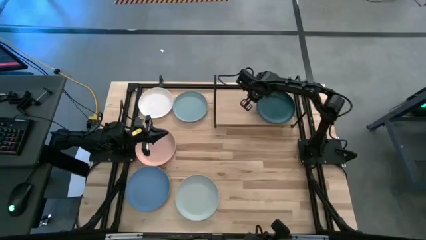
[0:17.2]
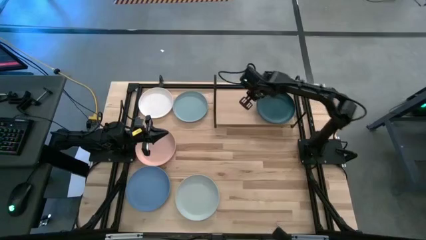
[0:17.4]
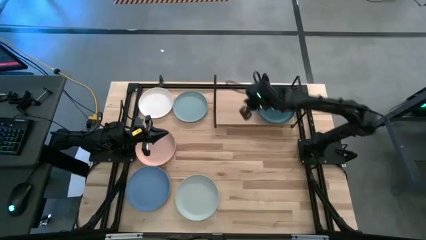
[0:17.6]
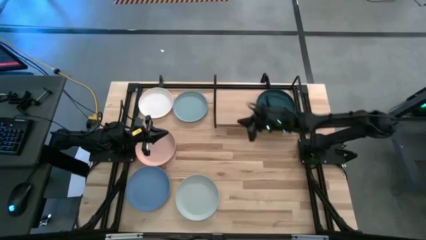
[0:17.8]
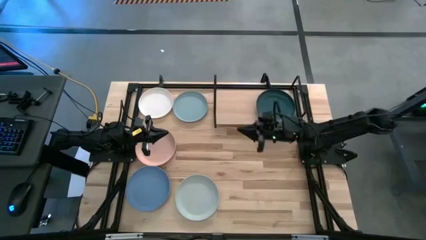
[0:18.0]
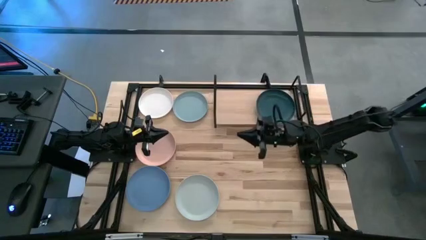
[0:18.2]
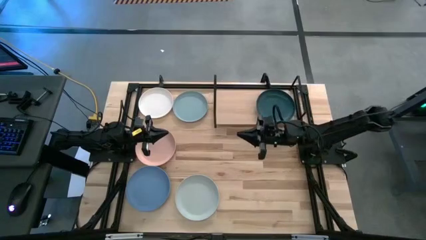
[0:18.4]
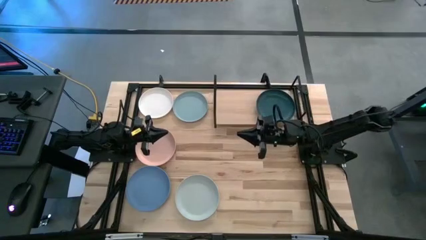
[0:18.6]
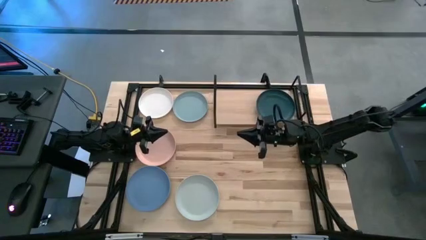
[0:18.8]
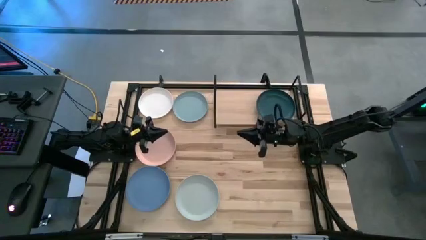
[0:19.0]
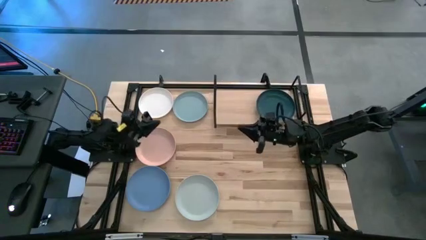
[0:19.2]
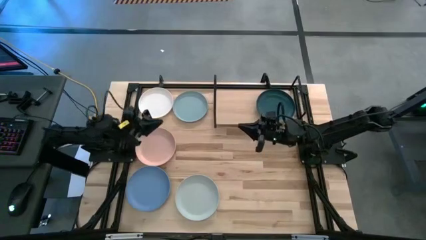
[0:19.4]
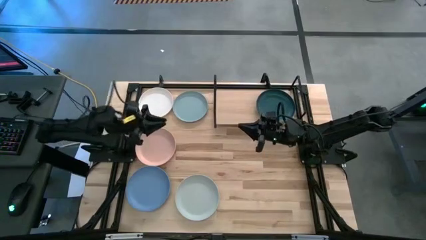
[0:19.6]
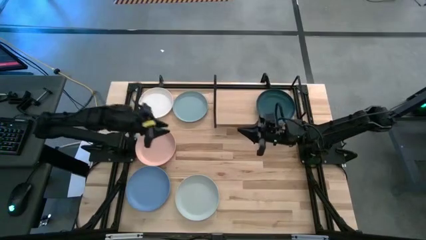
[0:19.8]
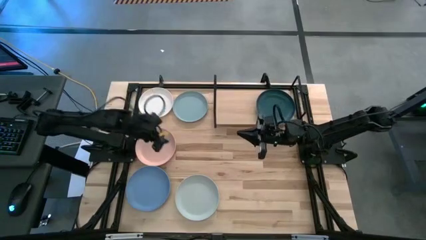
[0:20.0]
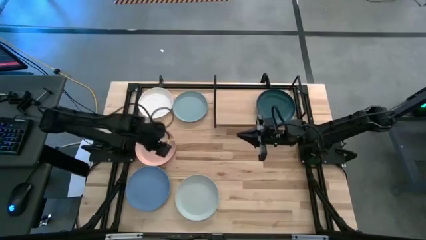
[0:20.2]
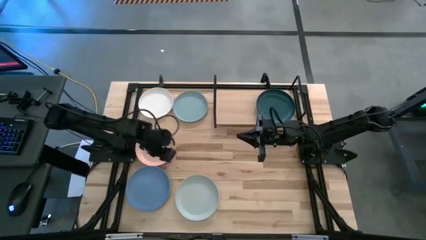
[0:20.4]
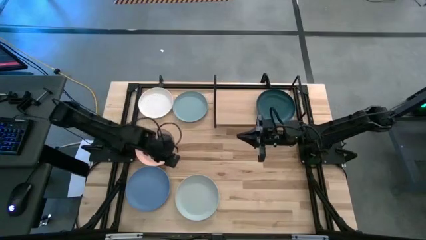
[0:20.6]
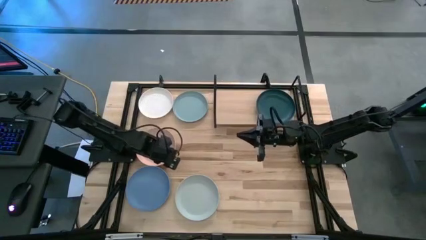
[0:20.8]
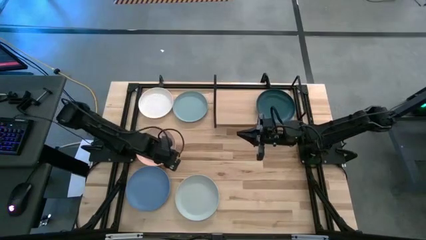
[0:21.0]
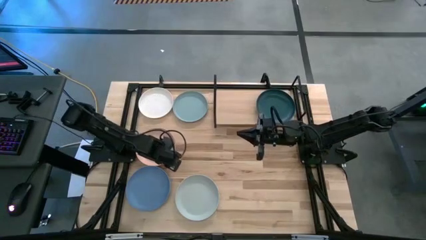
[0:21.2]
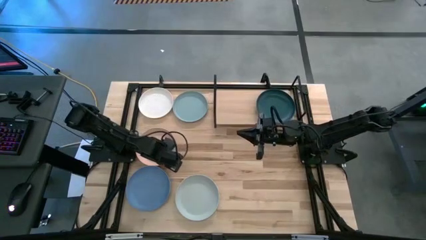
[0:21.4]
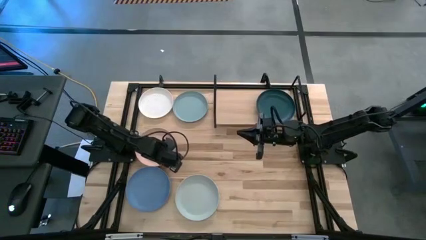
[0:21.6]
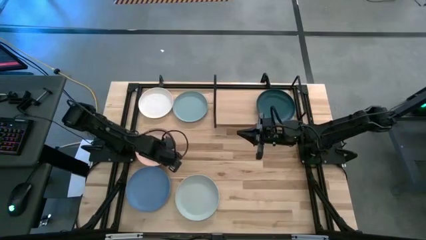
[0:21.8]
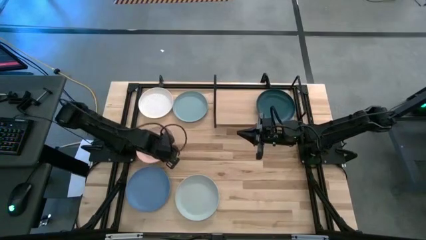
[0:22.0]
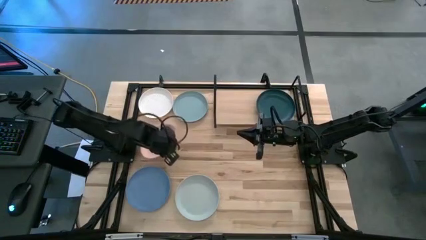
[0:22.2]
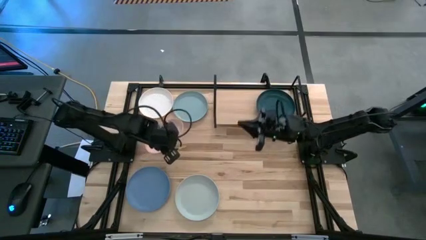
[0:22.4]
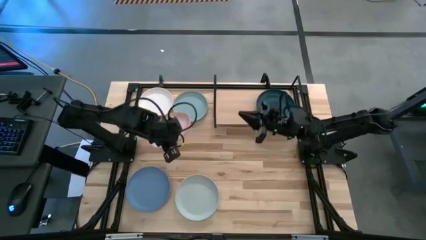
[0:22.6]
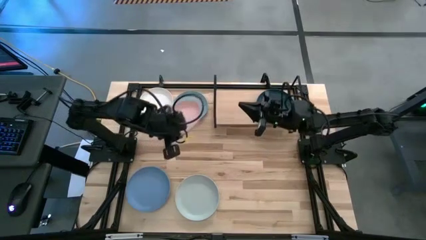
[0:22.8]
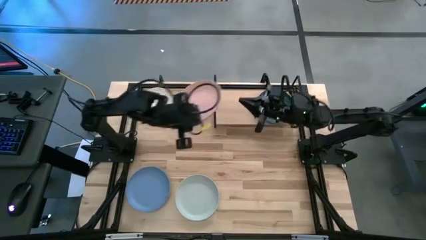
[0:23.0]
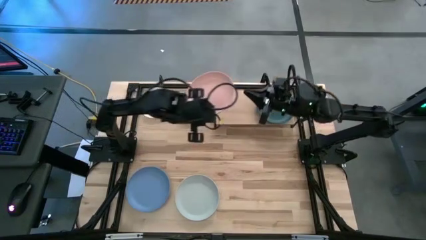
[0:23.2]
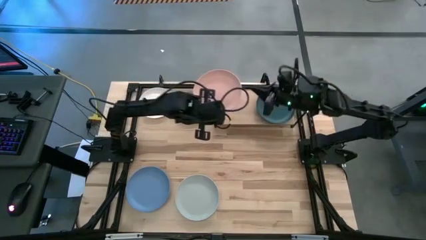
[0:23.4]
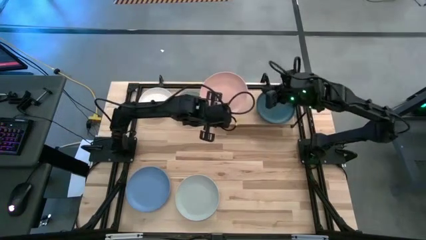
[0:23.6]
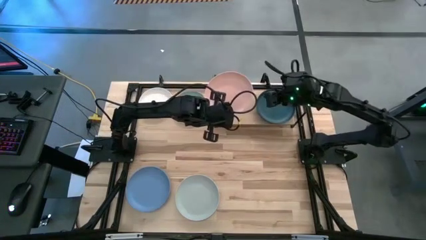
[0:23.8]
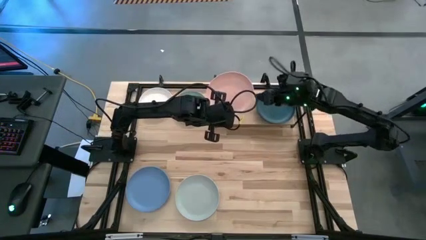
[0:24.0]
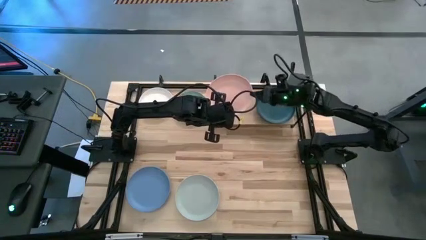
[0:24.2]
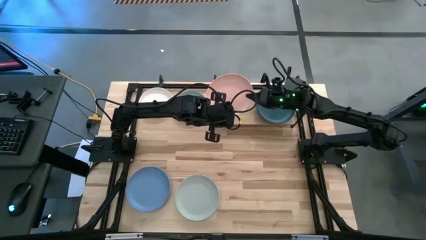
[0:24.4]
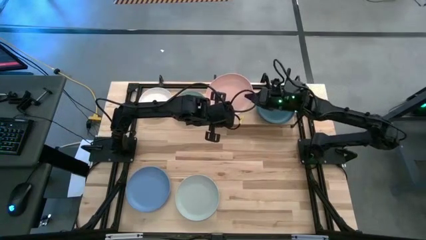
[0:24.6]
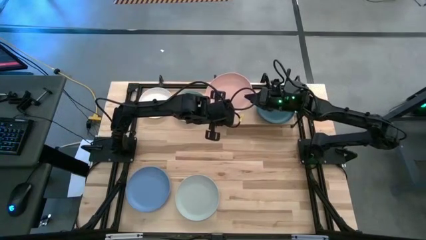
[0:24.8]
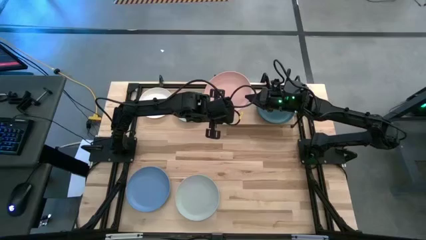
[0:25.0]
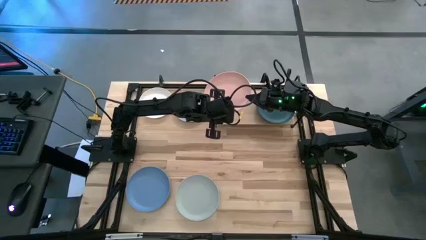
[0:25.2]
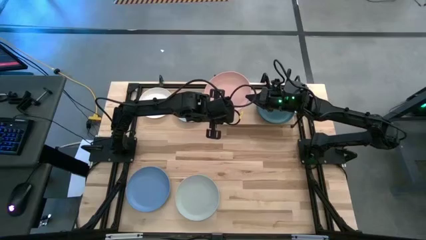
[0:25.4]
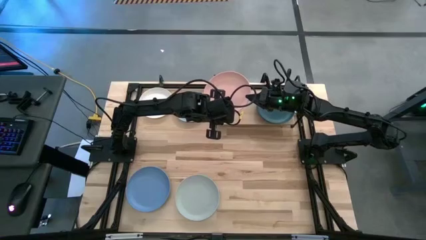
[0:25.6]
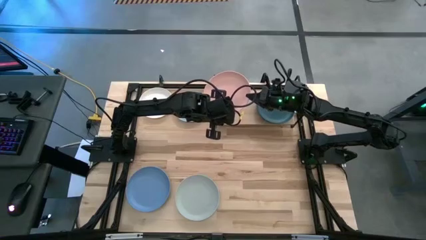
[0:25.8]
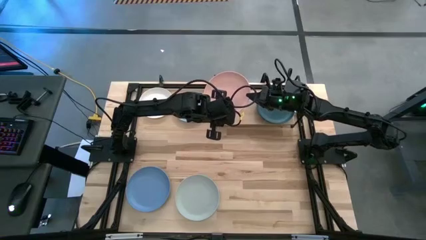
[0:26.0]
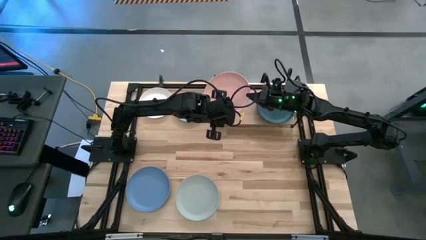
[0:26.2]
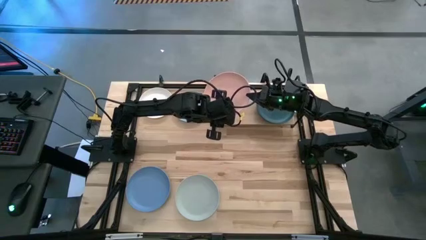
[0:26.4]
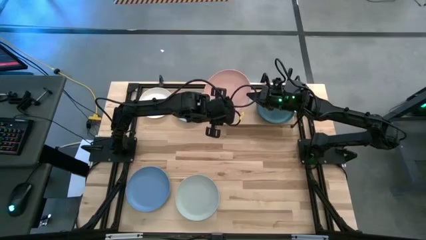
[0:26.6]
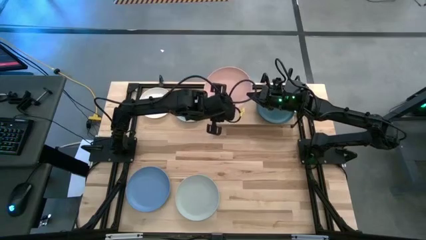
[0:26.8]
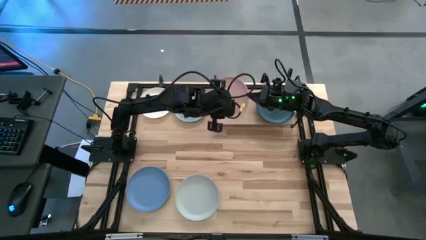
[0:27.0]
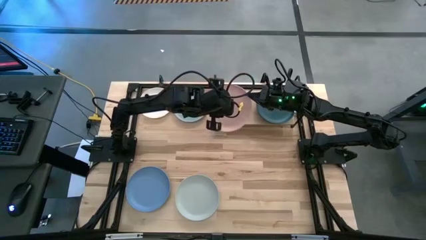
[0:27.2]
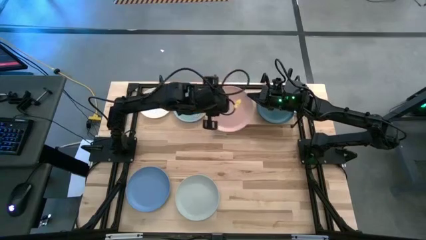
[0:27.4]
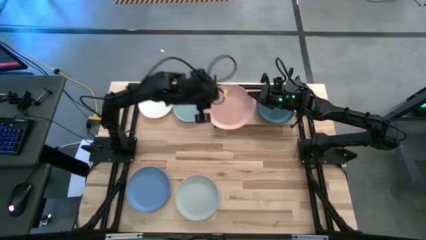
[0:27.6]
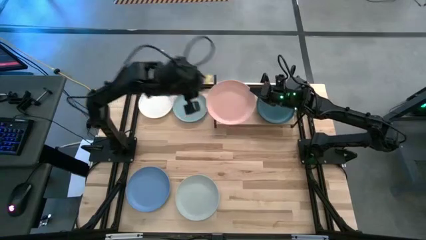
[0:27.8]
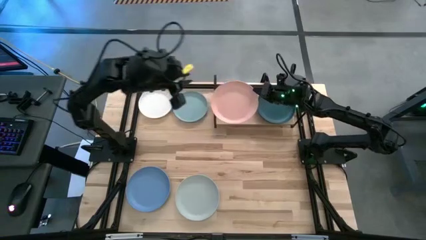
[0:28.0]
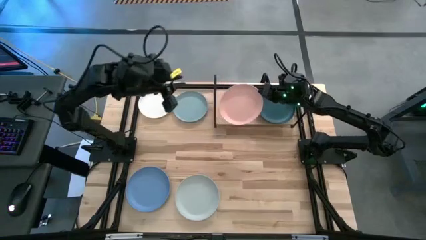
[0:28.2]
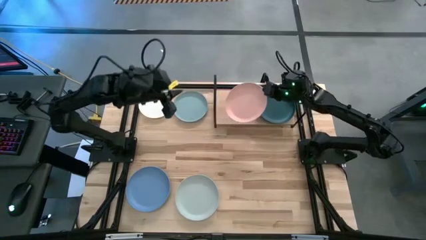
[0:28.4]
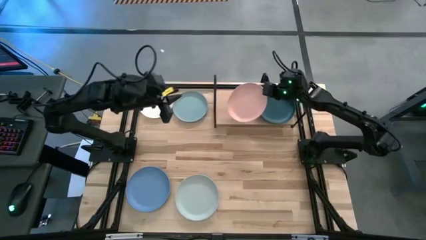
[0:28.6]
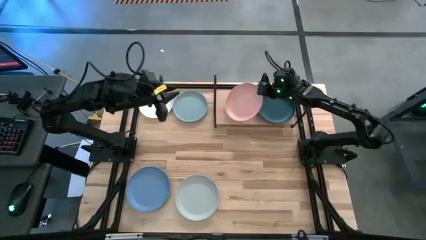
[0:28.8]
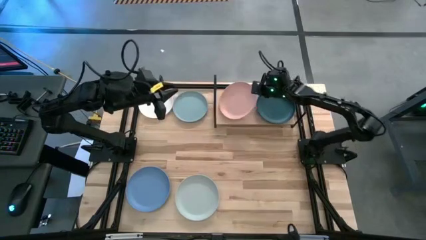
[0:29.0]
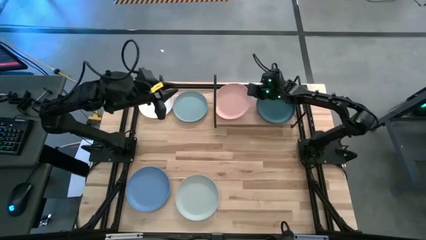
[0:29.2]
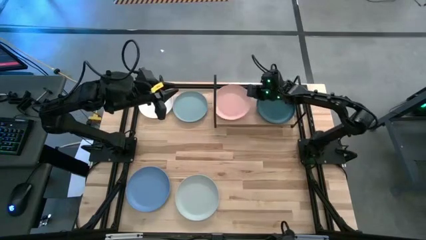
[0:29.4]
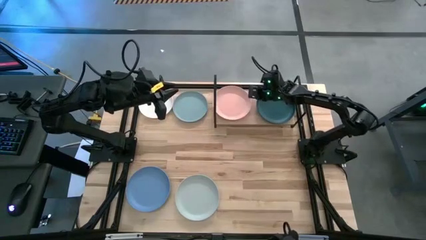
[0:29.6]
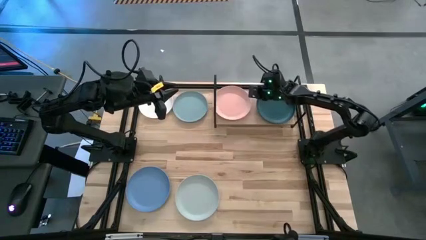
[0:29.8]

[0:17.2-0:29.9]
Task: Place and stack plates onto a shelf
Put the pink plate on the shelf

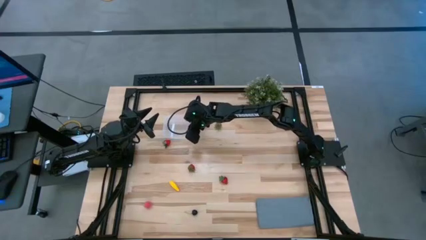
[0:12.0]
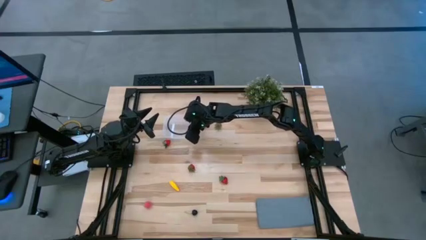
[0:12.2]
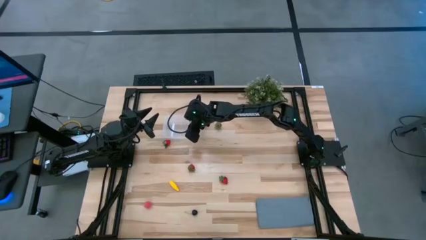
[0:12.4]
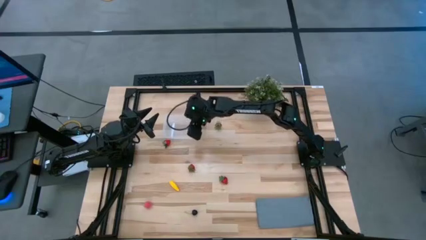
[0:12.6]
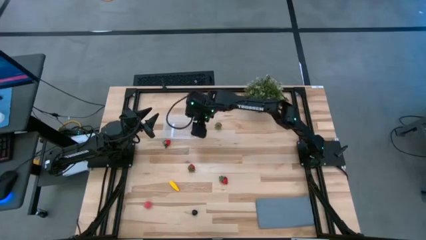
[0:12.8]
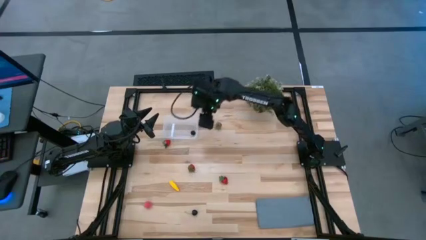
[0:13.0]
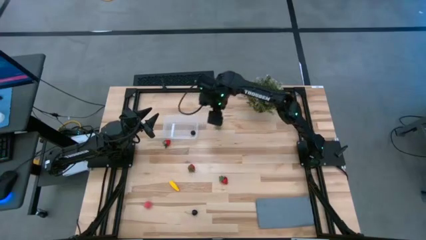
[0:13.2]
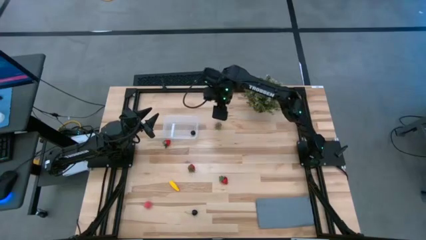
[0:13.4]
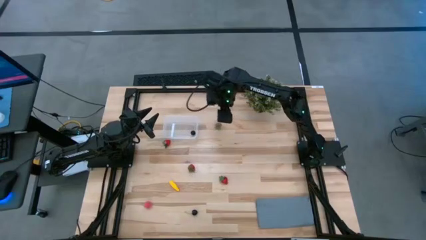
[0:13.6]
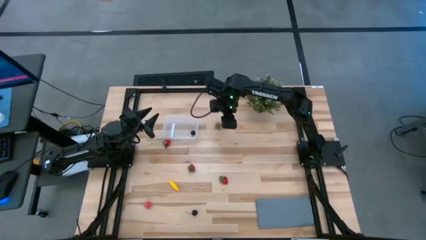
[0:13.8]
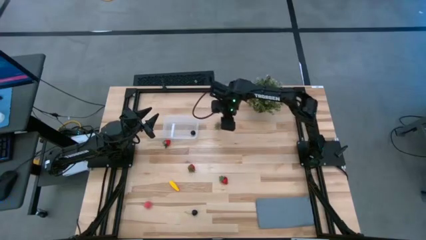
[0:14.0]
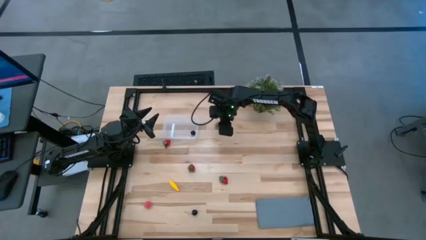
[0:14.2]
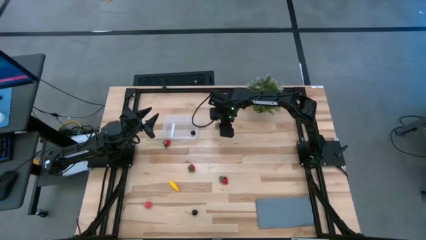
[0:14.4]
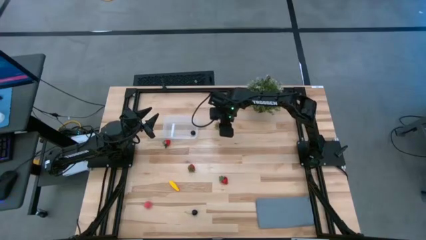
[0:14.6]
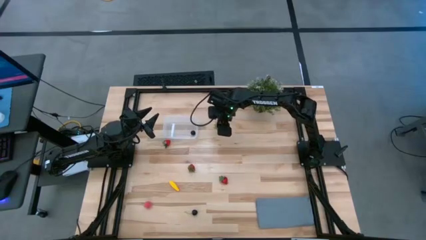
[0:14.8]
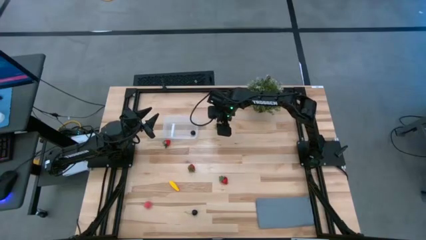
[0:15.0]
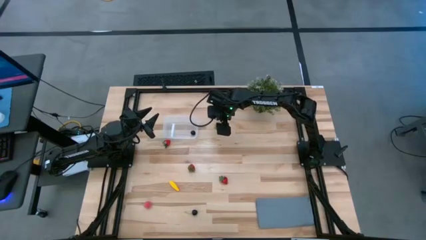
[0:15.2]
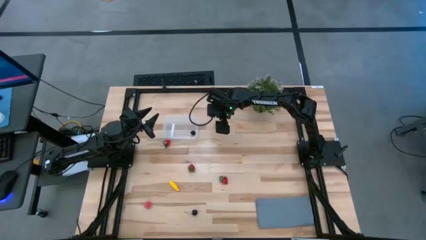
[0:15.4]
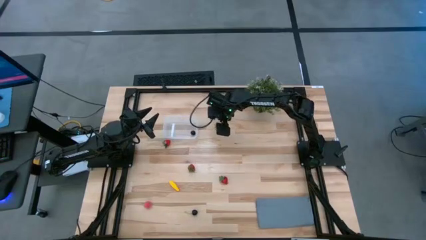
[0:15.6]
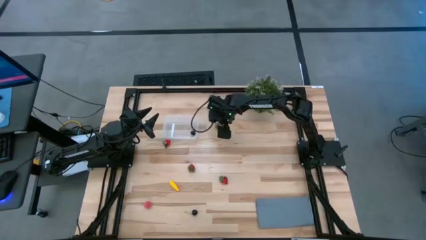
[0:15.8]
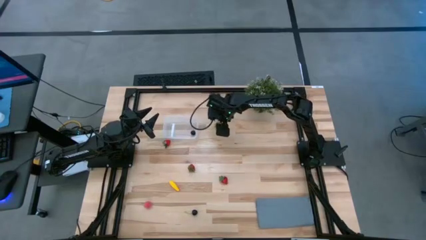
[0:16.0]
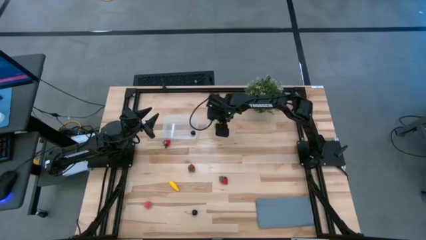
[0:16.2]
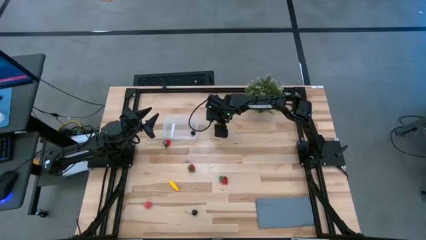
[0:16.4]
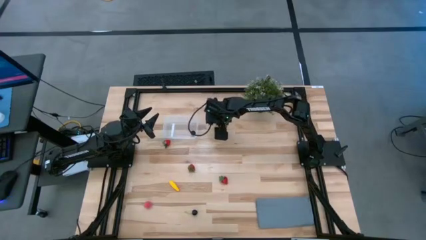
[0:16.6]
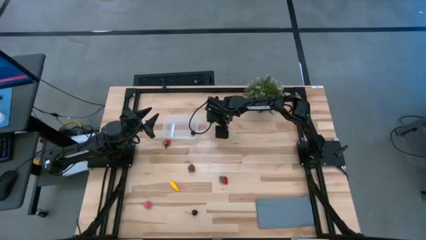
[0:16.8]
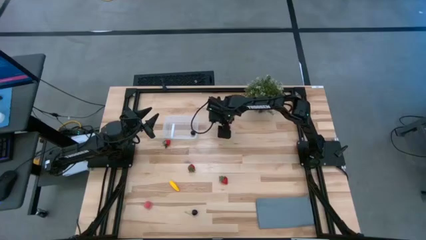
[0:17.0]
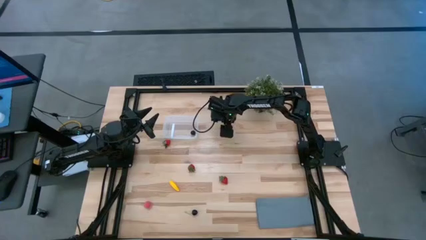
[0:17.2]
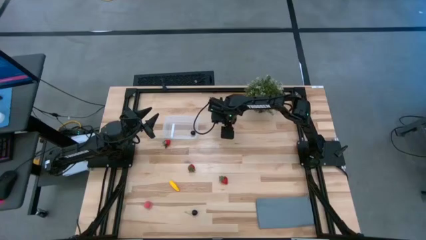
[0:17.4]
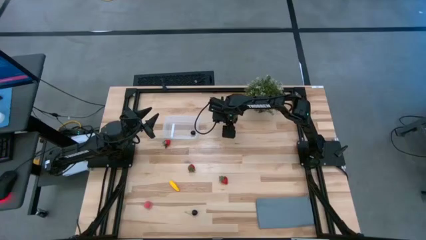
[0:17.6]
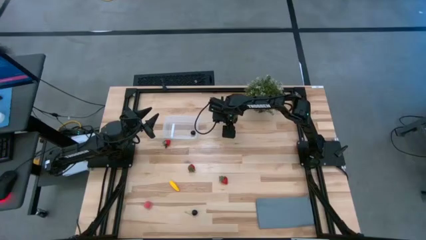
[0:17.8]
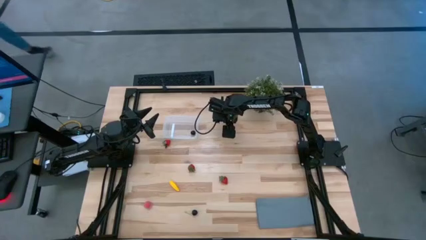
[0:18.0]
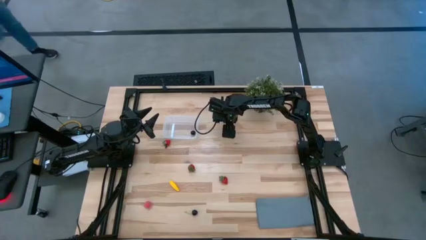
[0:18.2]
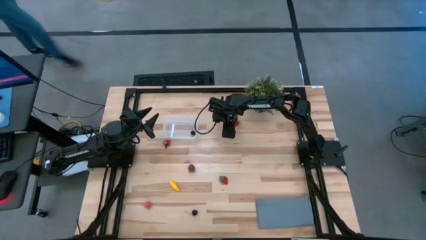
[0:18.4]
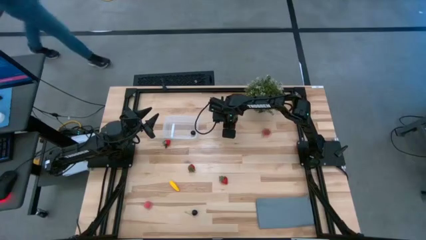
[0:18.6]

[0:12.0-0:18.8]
Task: Pick and placing Produce into tupperware
Put the strawberry into the transparent bin
